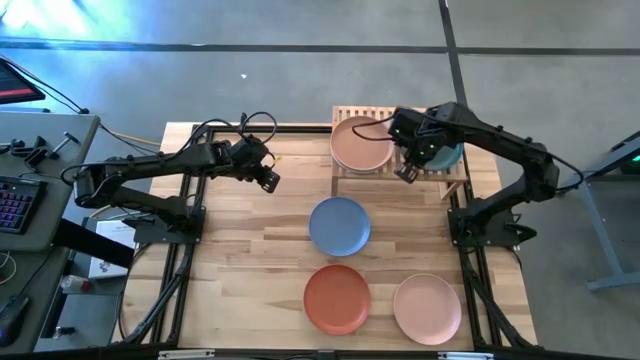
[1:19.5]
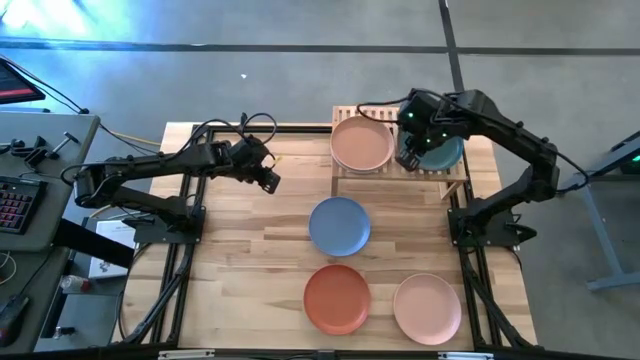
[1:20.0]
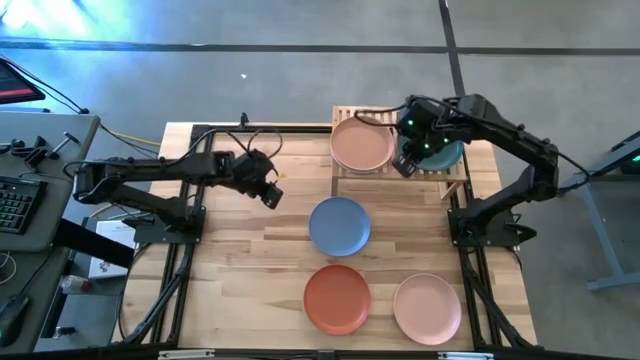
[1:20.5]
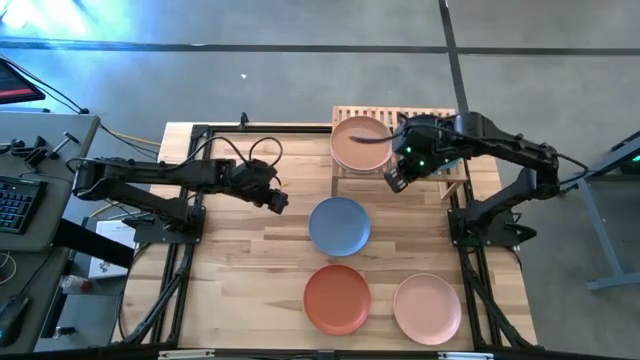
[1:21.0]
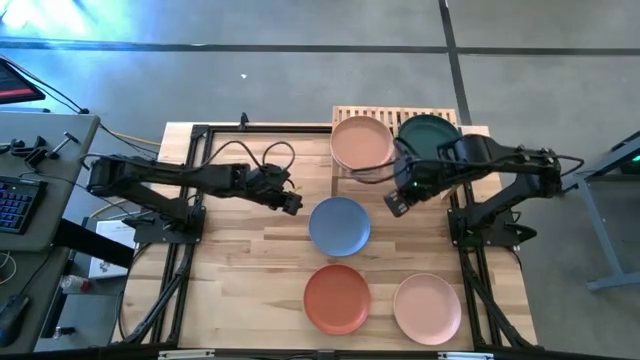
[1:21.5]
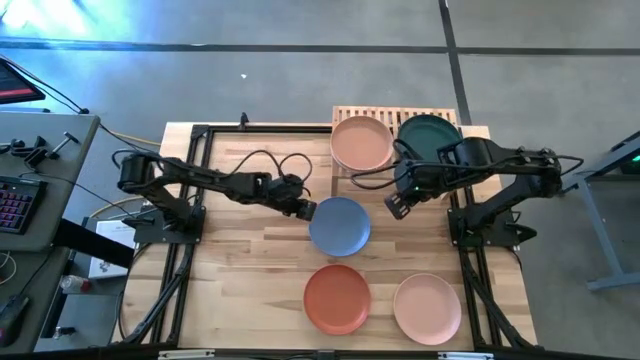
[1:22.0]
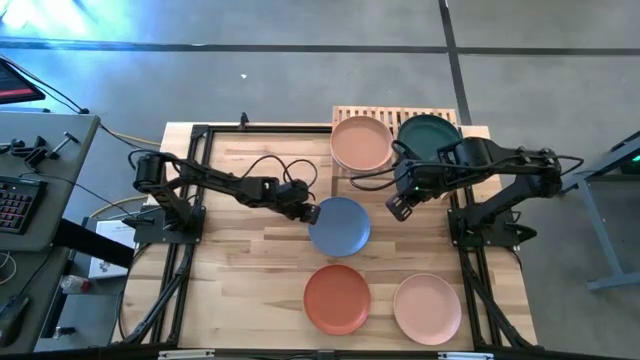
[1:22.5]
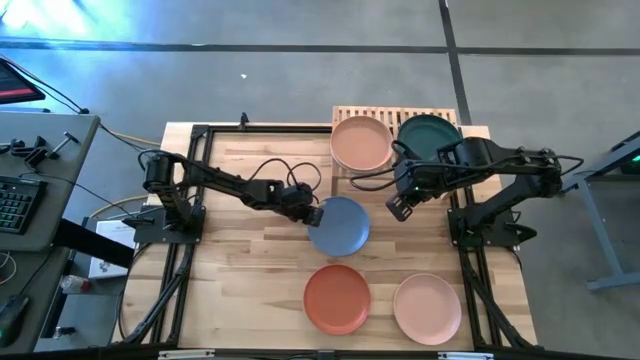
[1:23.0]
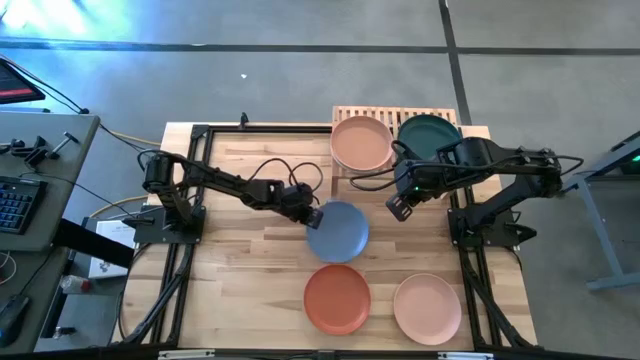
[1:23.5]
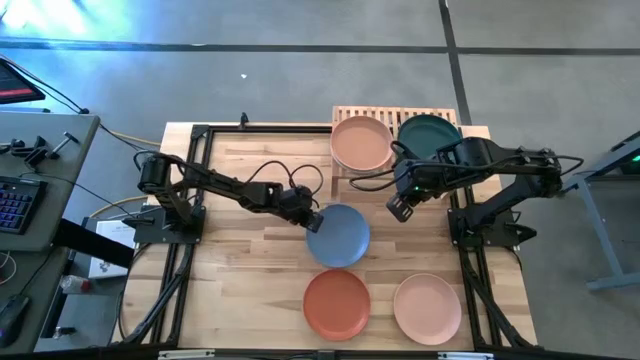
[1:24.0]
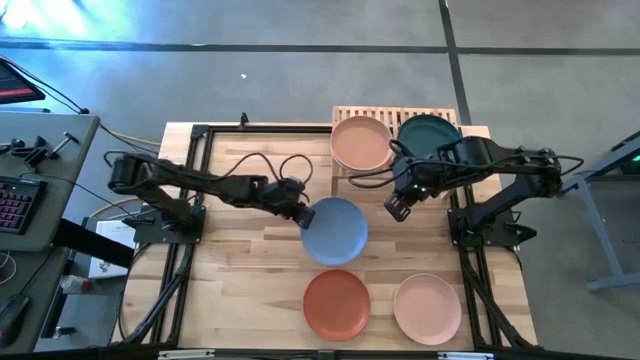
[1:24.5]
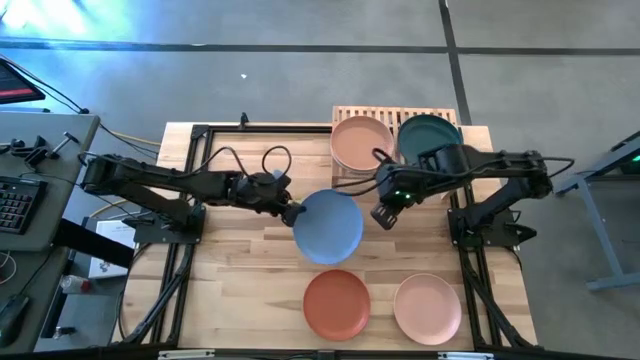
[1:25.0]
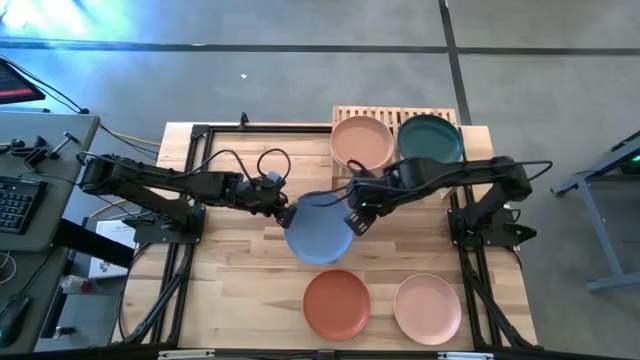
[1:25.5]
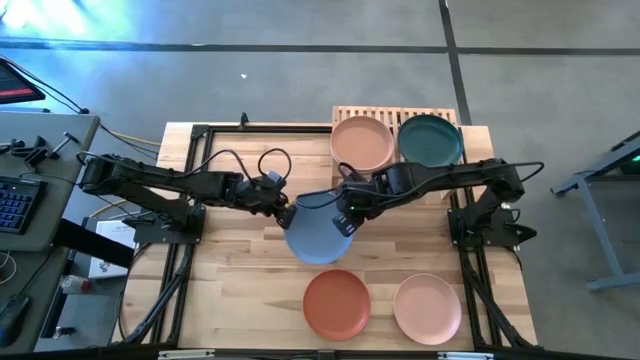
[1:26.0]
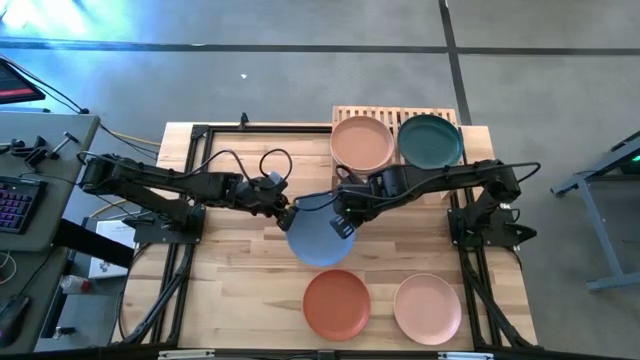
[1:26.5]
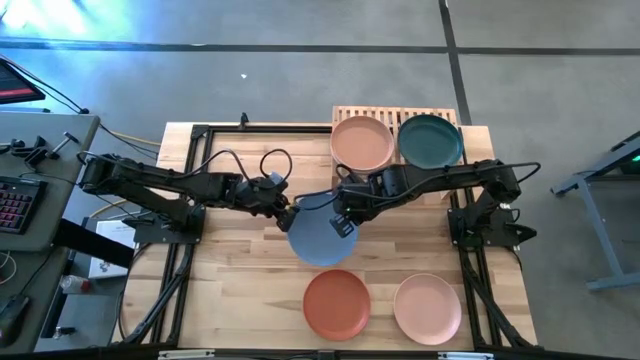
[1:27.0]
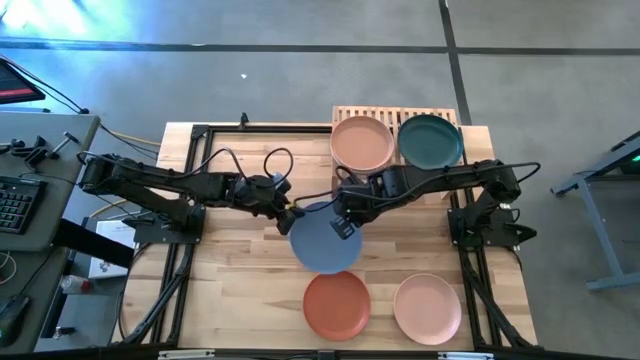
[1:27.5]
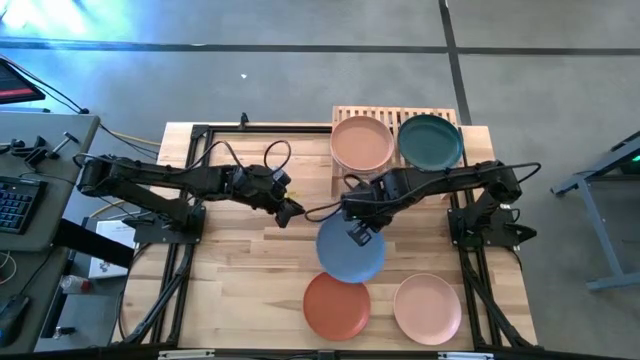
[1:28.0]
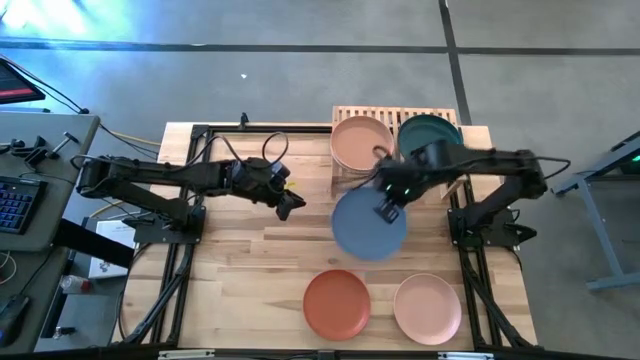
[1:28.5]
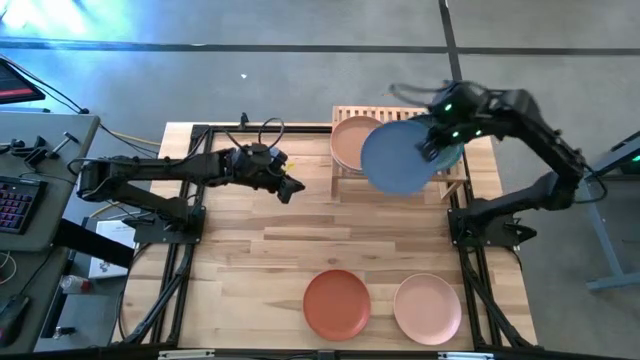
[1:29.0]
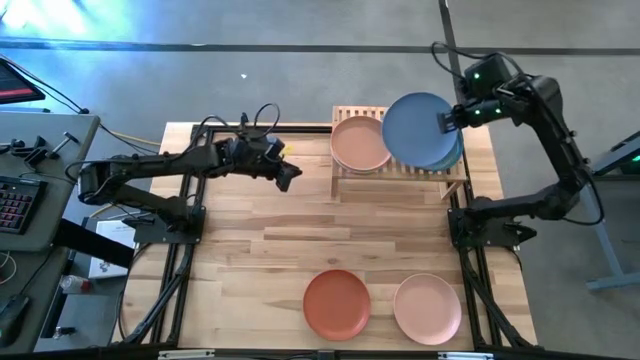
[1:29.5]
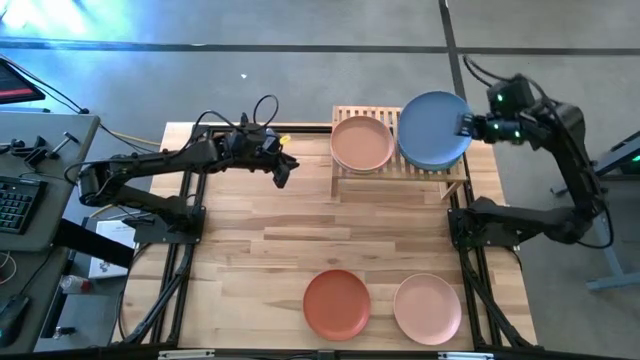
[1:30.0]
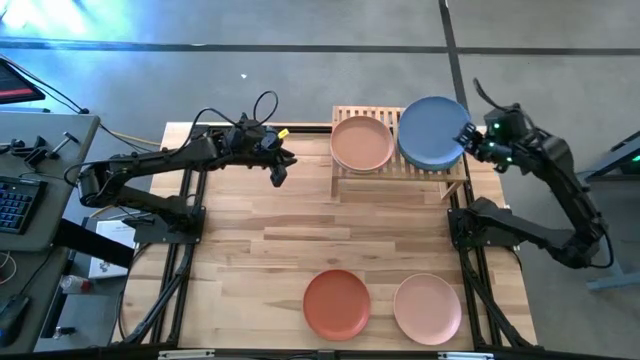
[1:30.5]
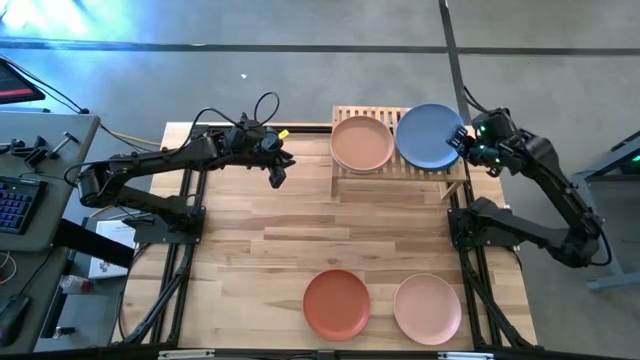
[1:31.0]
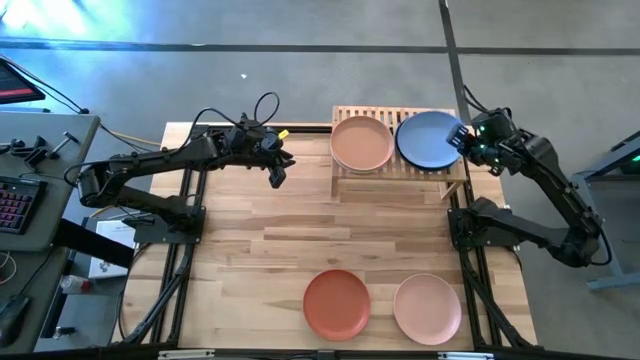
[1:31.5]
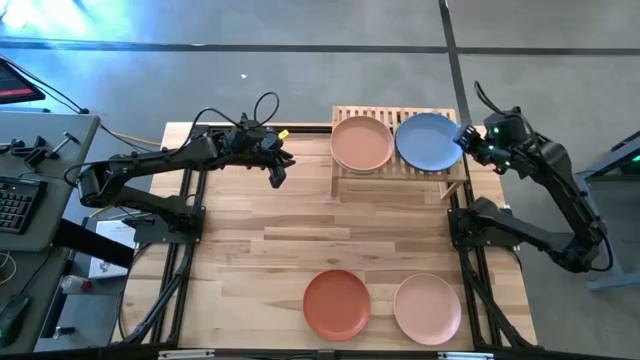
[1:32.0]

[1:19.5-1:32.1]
Task: Place and stack plates onto a shelf
Stack the blue plate on top of the green plate

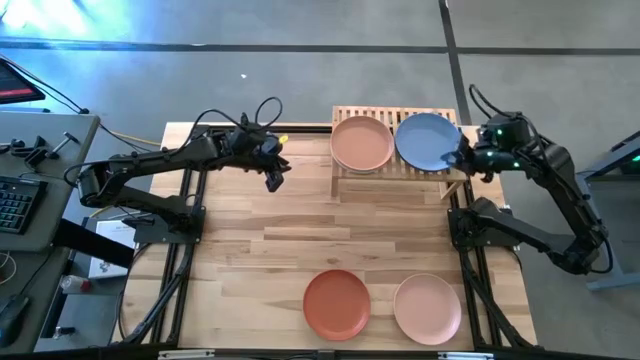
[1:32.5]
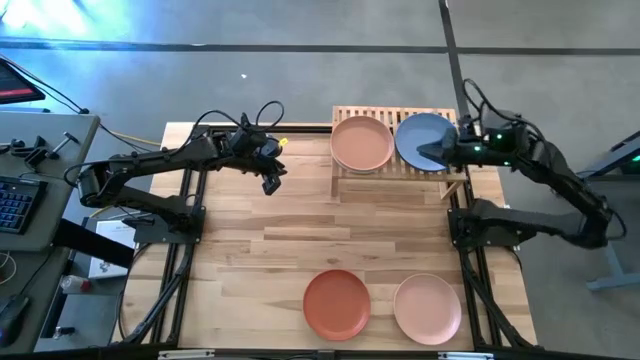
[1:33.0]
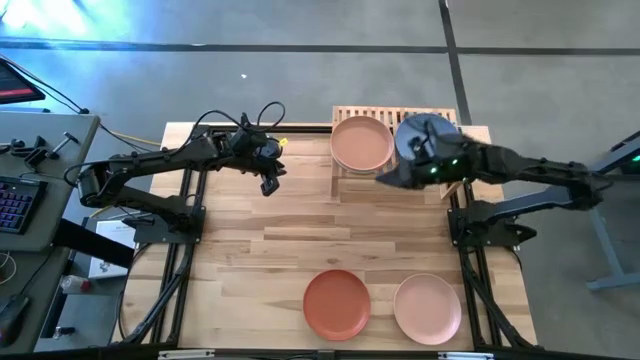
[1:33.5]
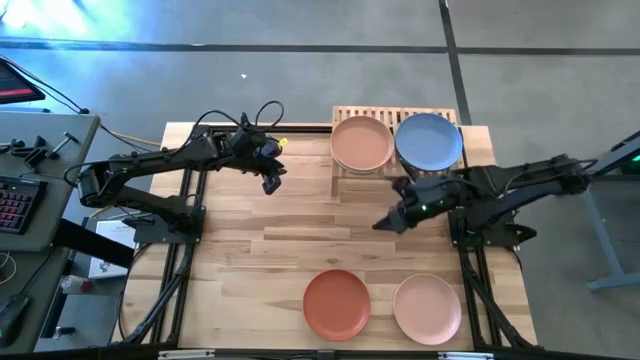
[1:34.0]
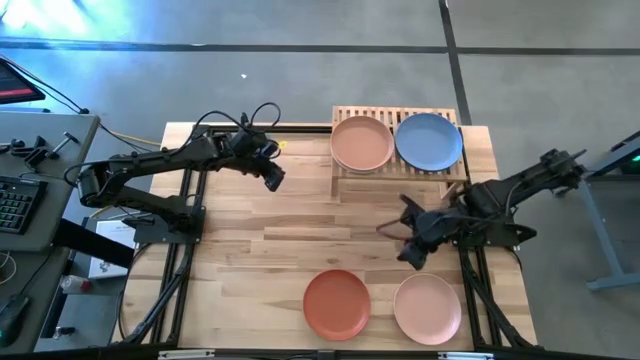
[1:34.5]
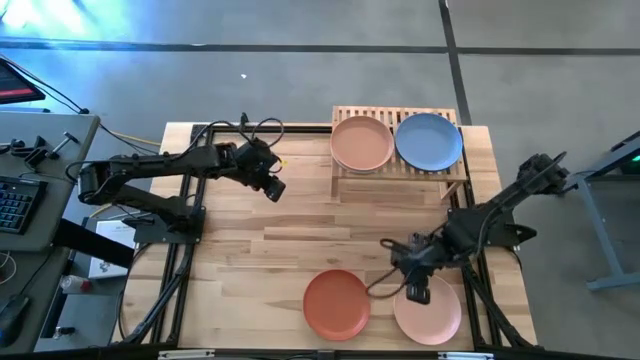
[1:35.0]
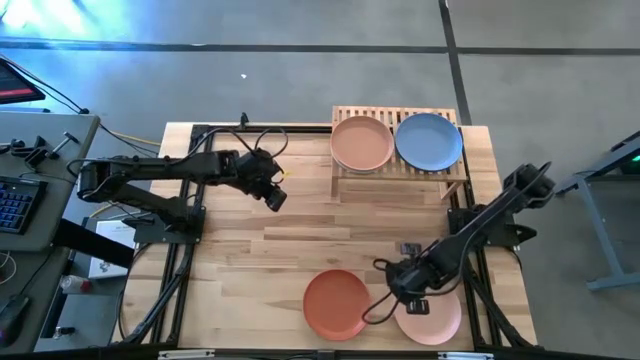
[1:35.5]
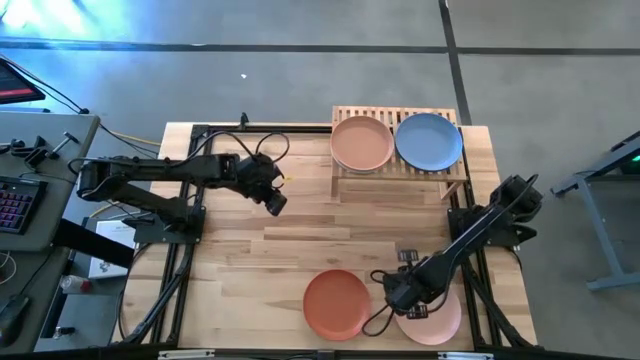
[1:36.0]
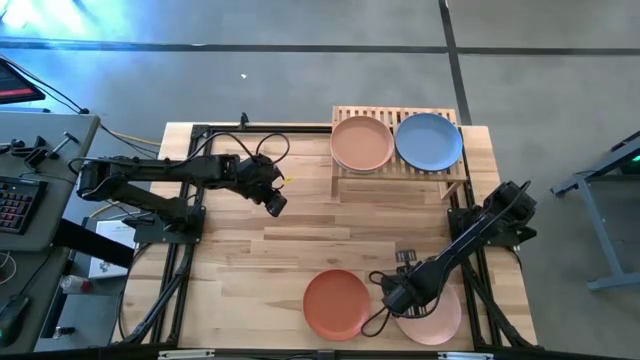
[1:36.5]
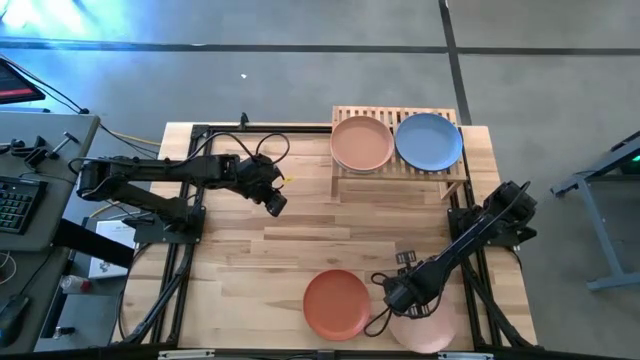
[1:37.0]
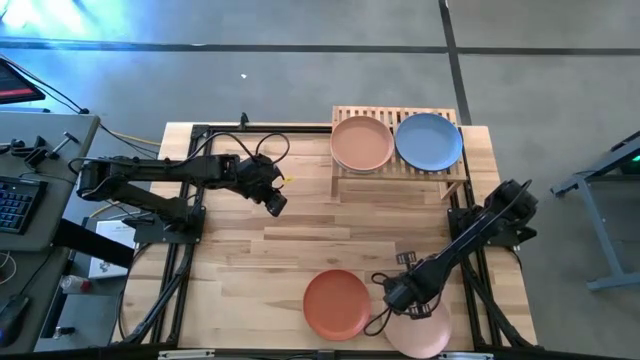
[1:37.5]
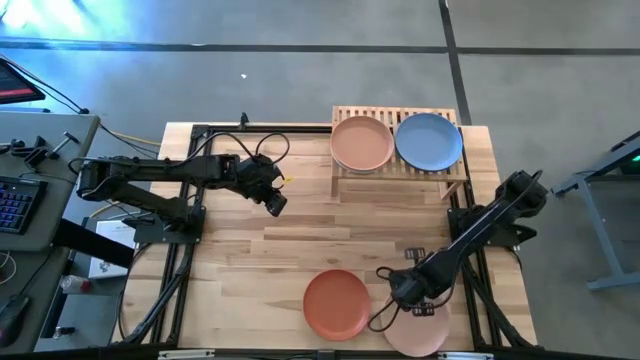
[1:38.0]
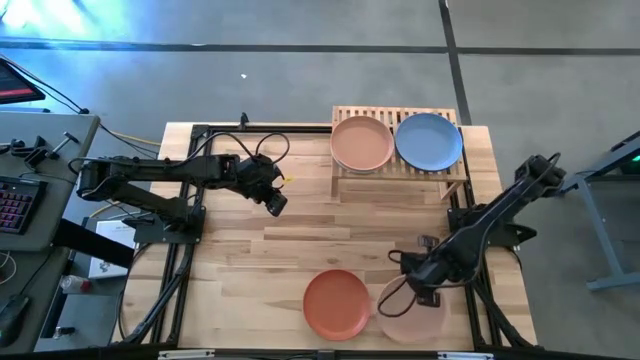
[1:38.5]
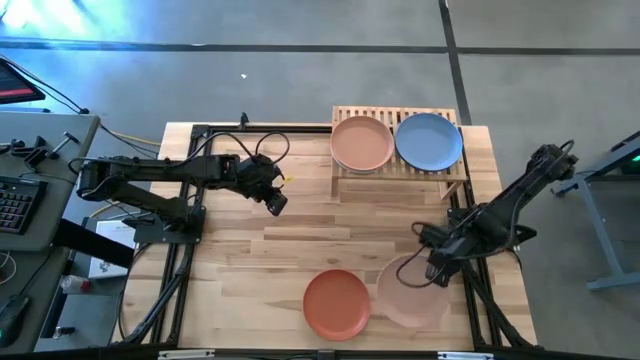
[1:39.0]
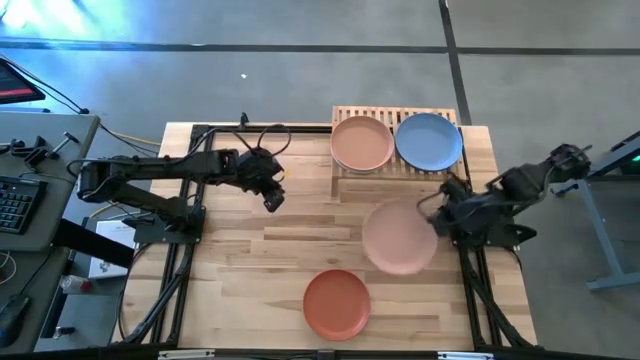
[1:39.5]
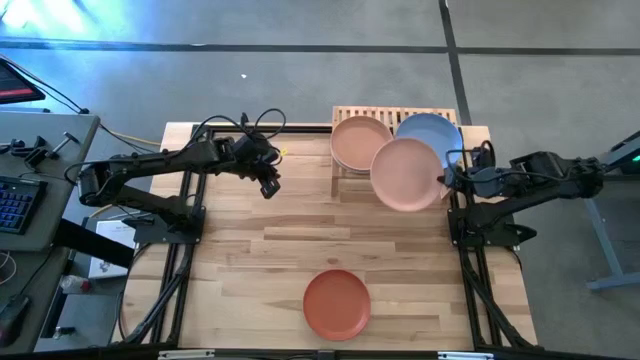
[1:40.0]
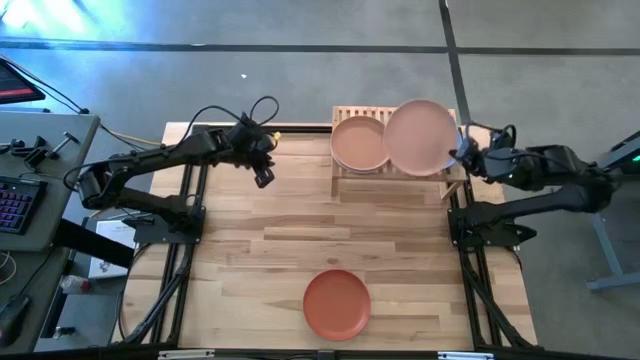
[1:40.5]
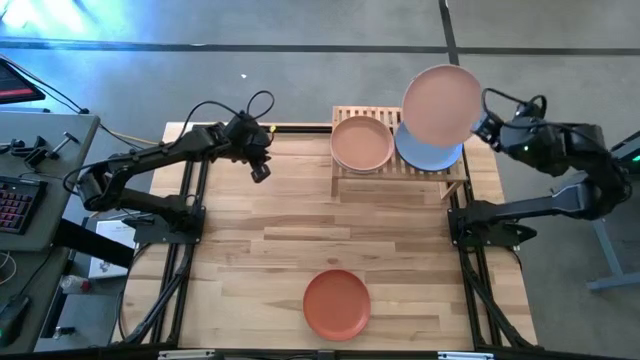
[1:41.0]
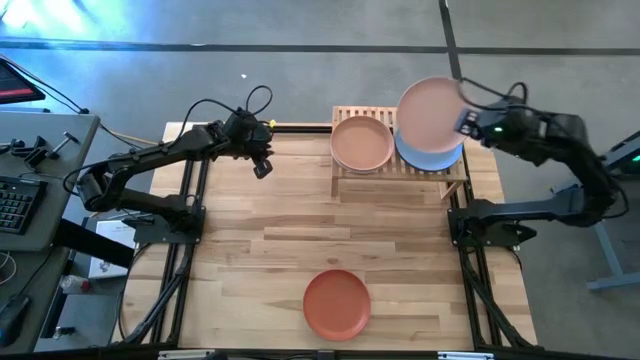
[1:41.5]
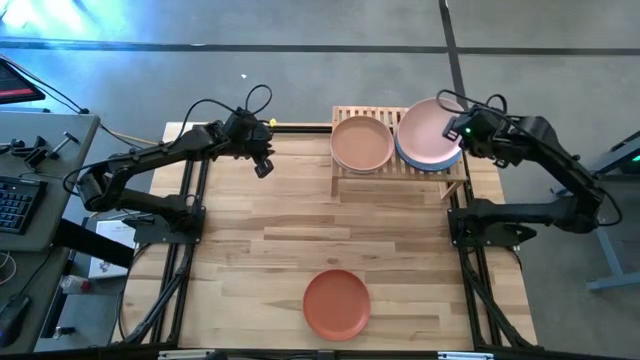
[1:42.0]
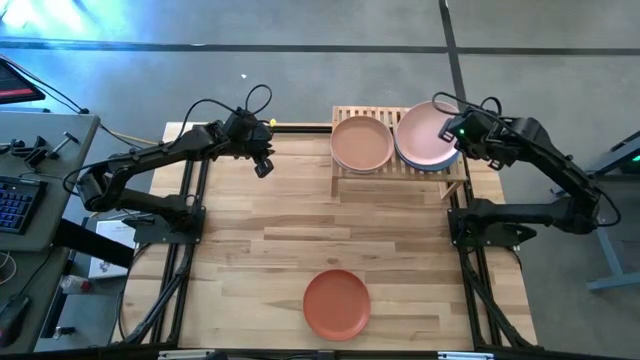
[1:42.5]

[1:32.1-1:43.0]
Stack the light pink plate on top of the blue plate
